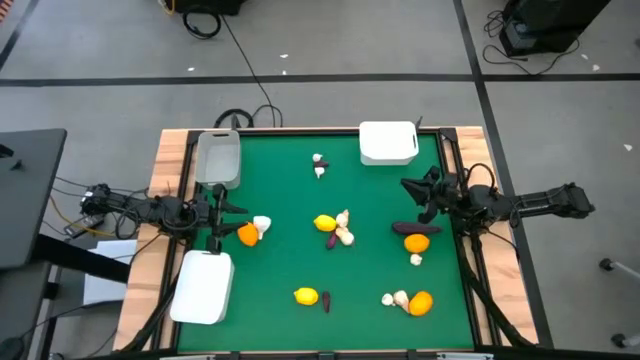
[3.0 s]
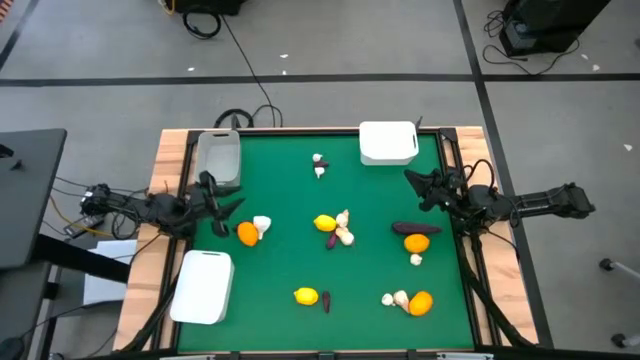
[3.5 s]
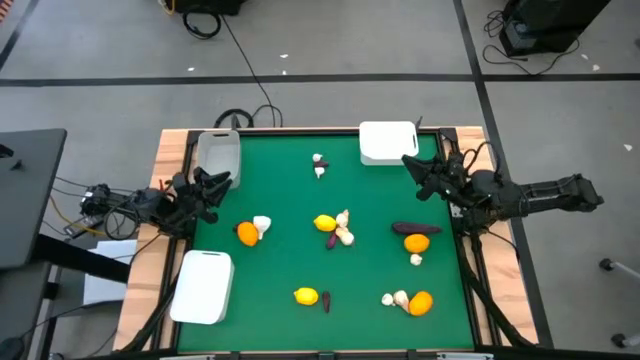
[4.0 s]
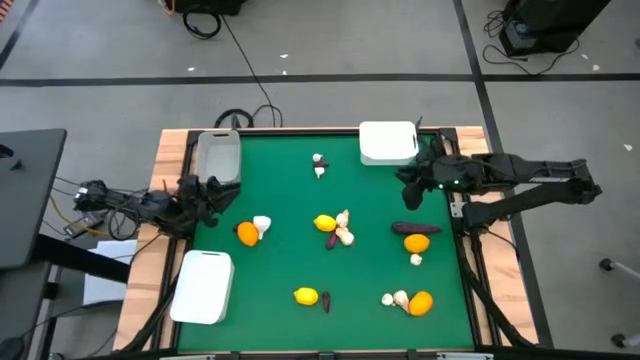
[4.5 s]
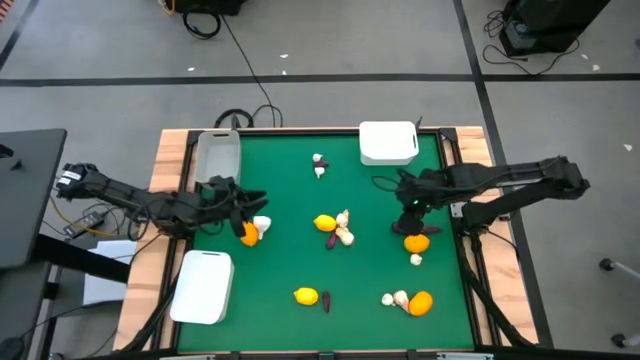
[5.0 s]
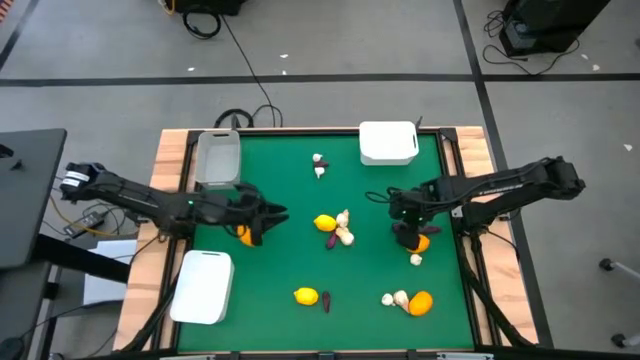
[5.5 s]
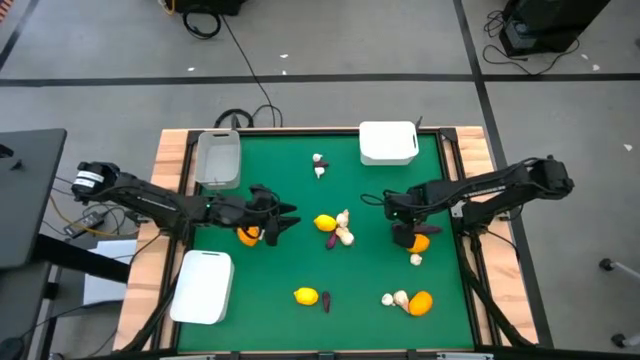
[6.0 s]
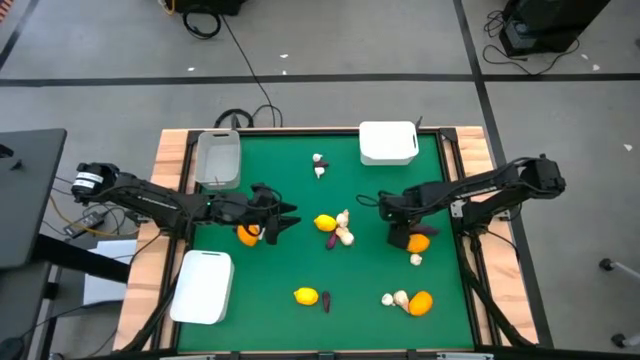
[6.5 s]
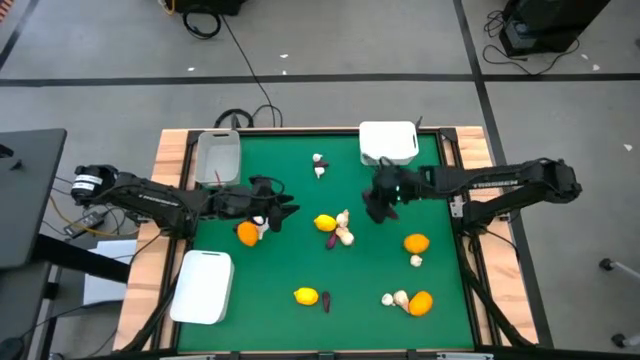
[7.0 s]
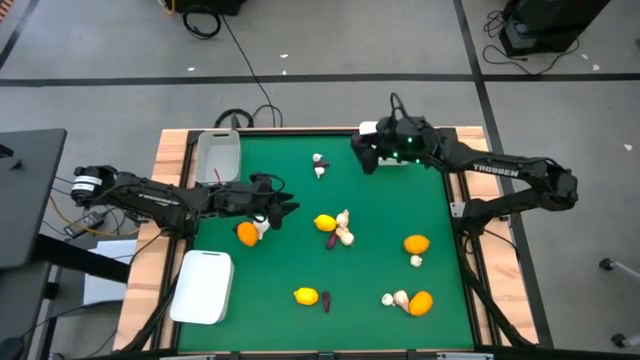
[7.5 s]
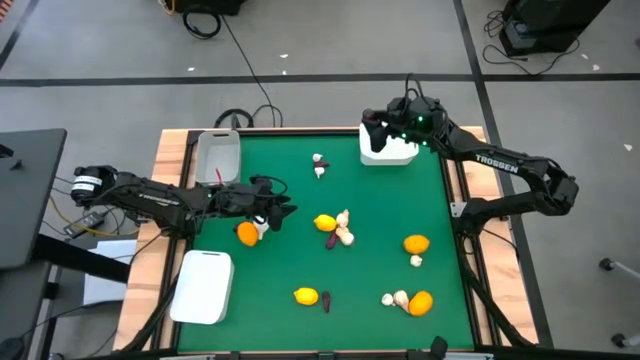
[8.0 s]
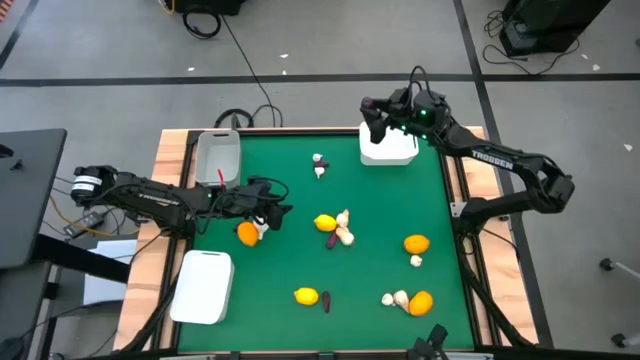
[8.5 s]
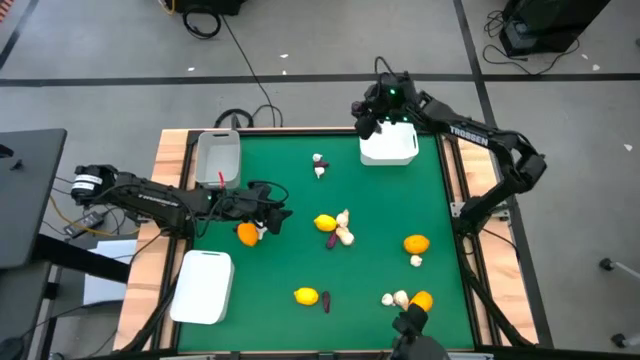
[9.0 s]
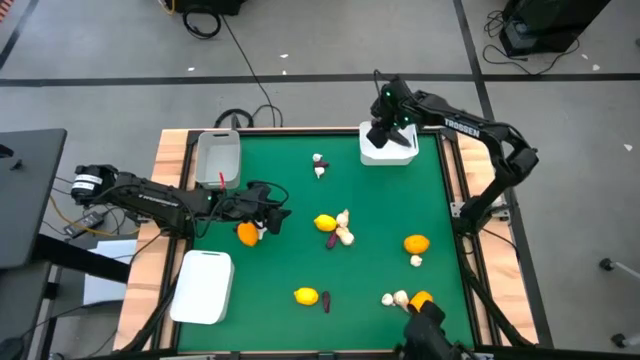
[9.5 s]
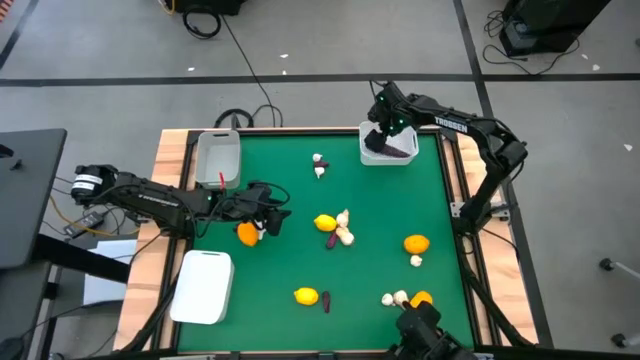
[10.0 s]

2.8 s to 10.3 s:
Task: Sort produce into baskets
Put the eggplant into the top white bin

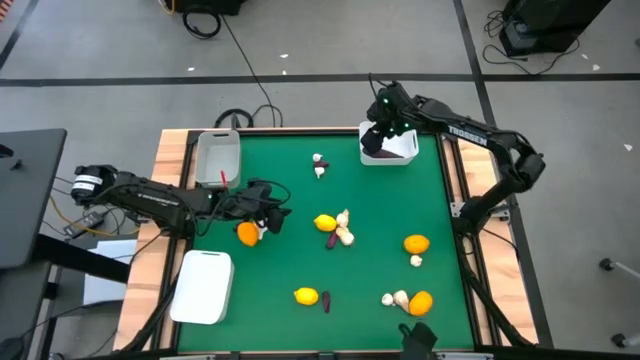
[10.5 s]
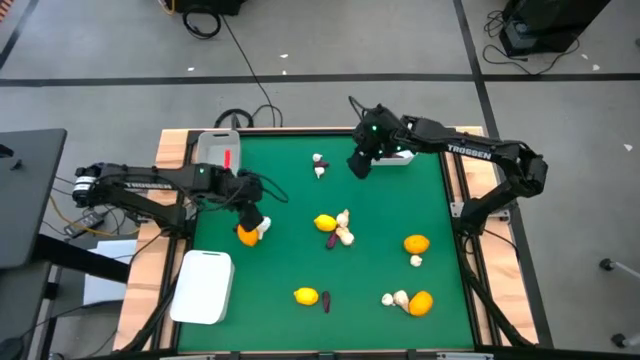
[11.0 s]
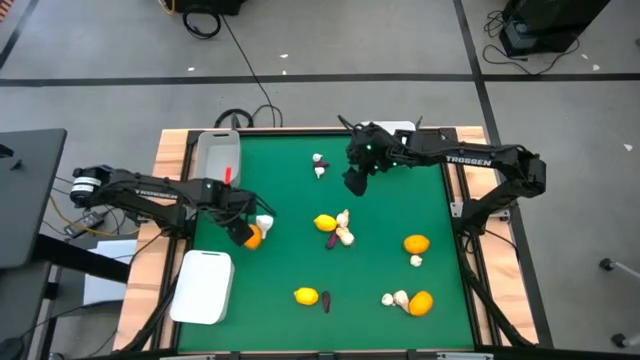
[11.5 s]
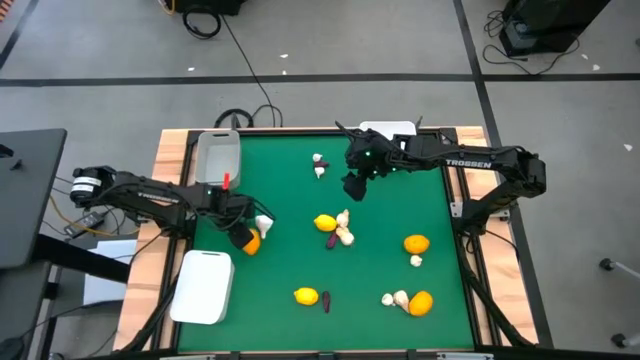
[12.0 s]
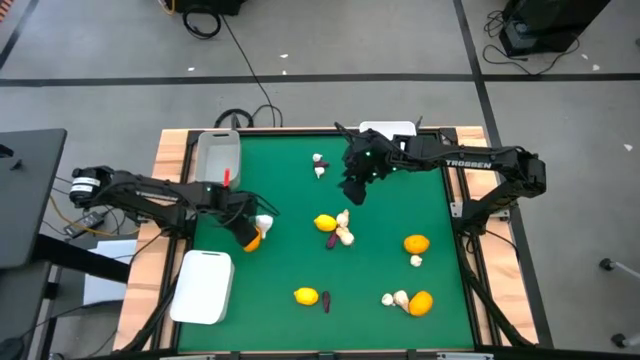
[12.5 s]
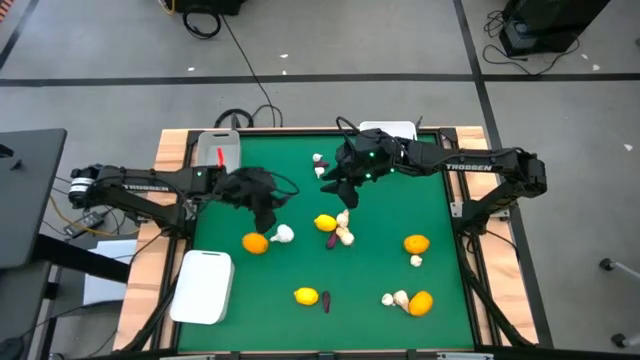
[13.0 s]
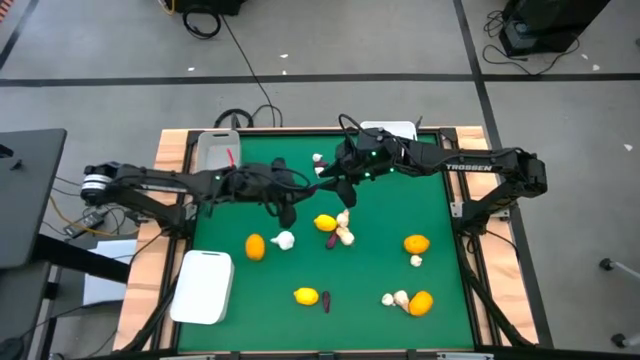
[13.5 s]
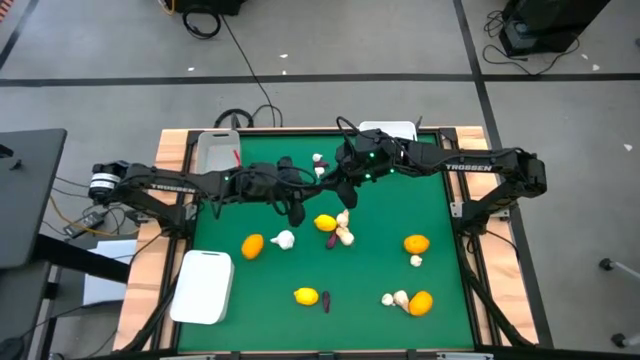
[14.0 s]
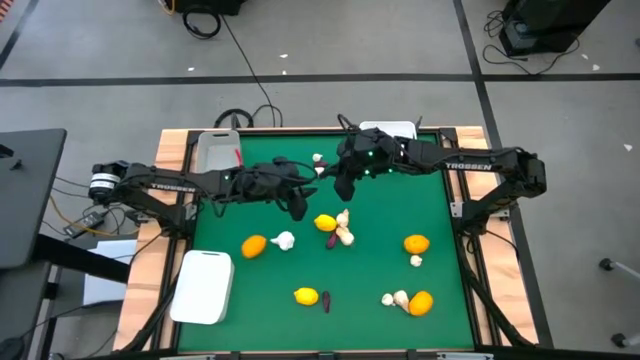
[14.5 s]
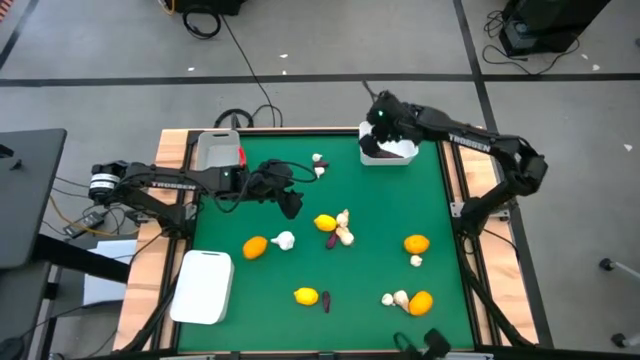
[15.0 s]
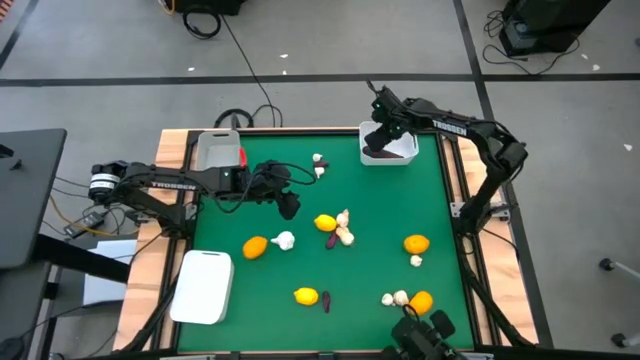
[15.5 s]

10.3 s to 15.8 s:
Put the eggplant into the top white bin

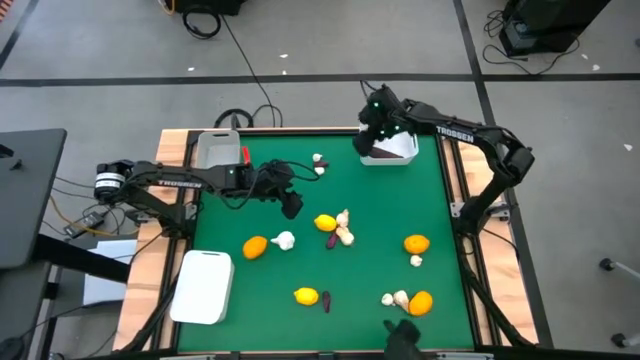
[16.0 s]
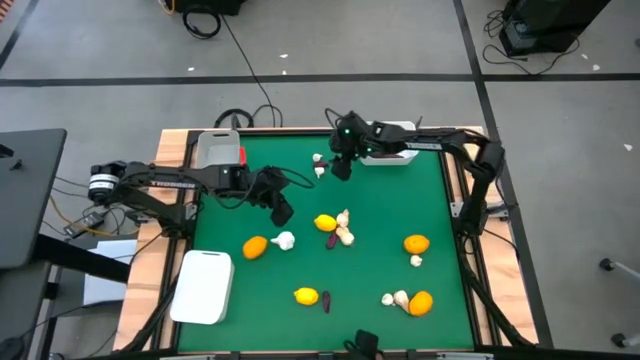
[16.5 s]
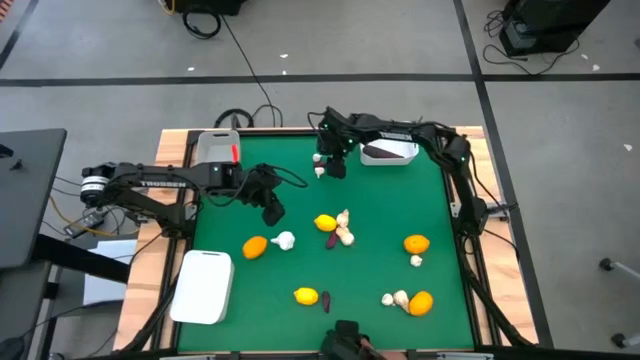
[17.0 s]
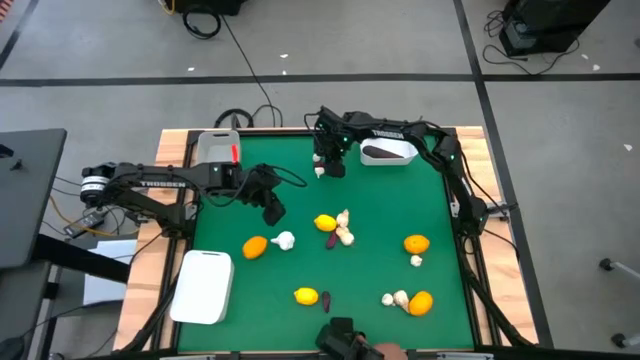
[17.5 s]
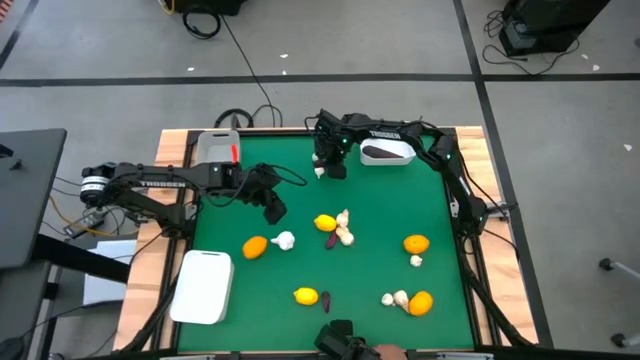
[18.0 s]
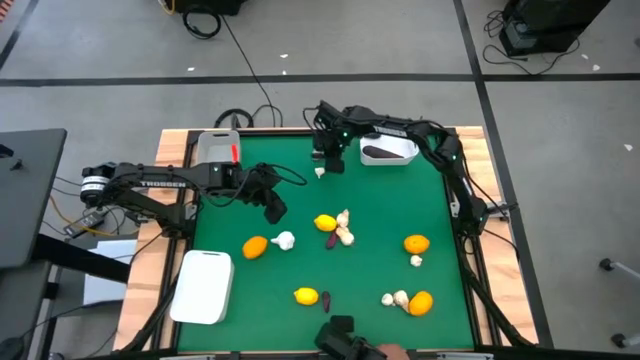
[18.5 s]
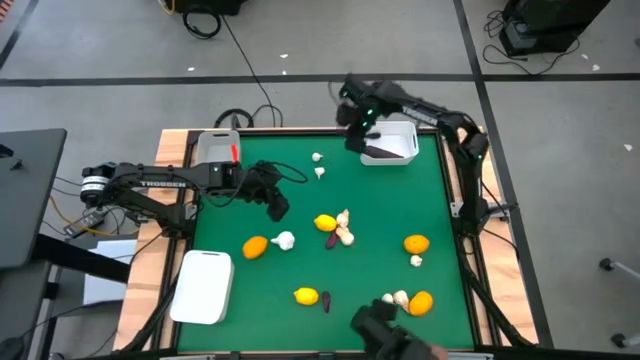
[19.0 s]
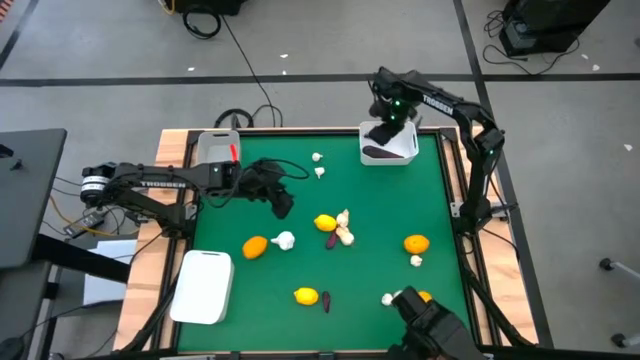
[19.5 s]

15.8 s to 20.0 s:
Put the eggplant into the top white bin

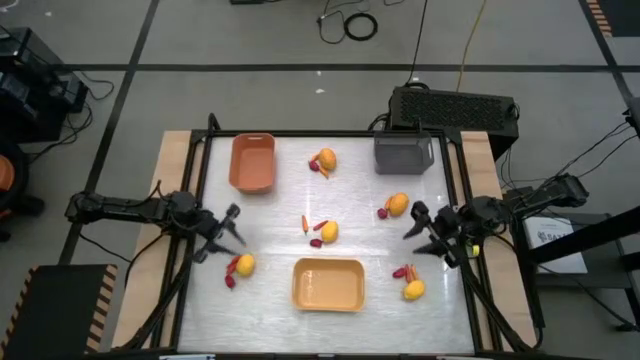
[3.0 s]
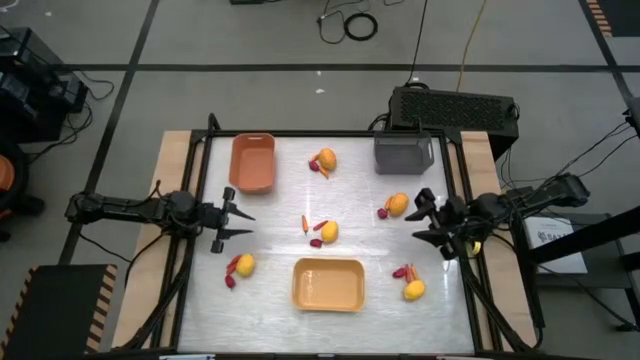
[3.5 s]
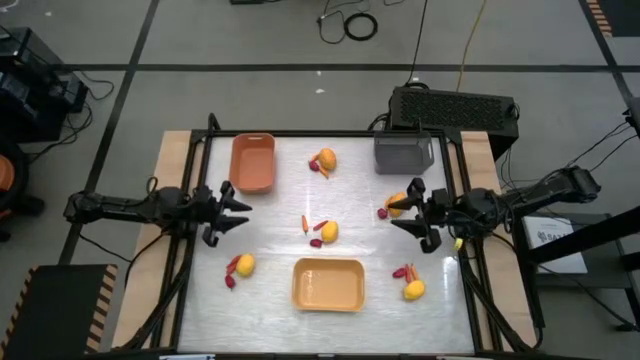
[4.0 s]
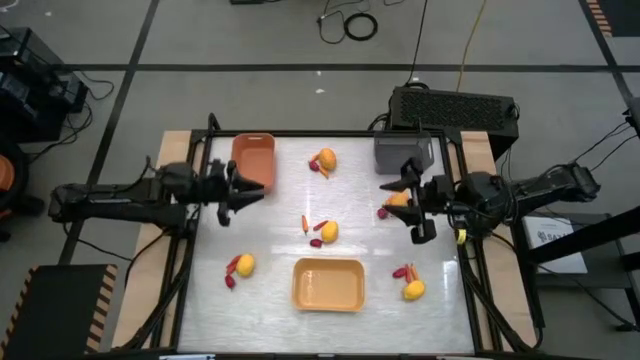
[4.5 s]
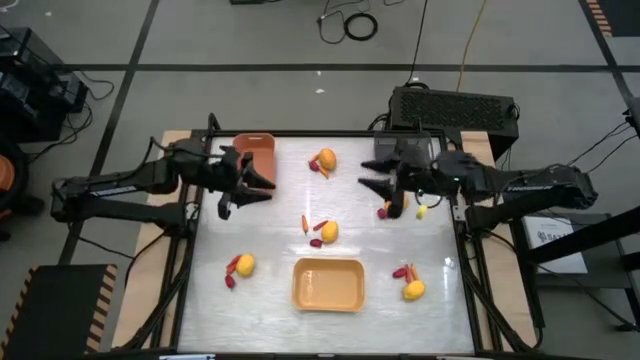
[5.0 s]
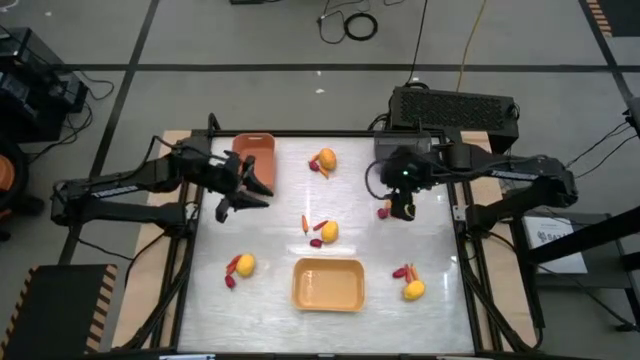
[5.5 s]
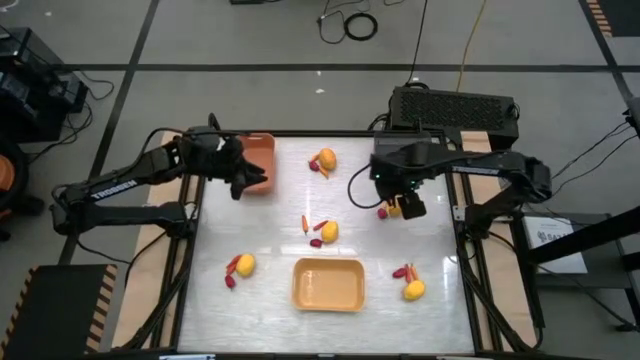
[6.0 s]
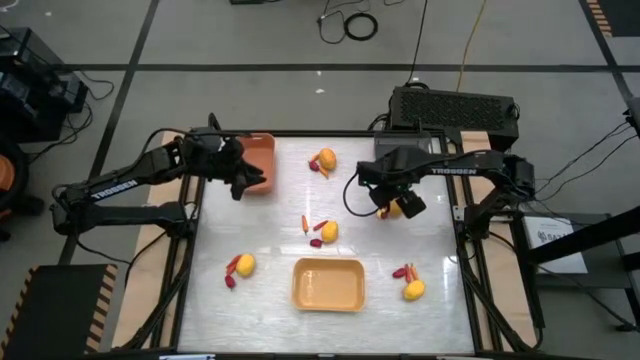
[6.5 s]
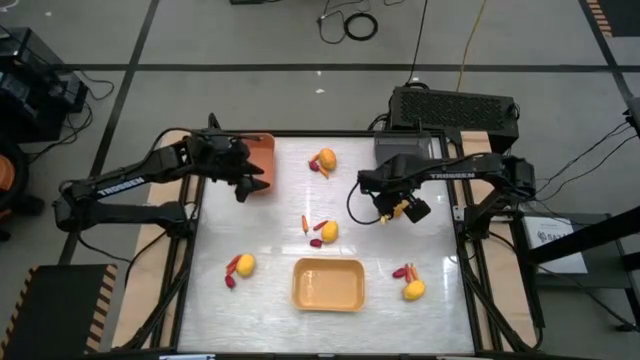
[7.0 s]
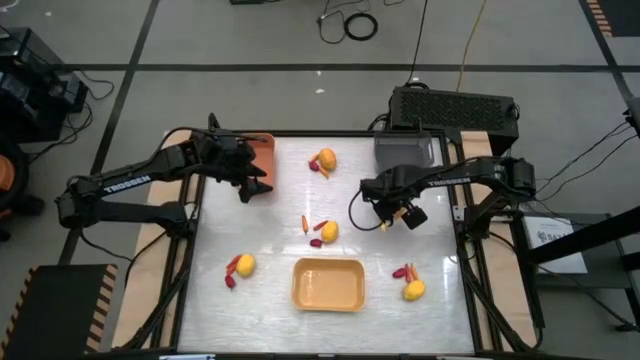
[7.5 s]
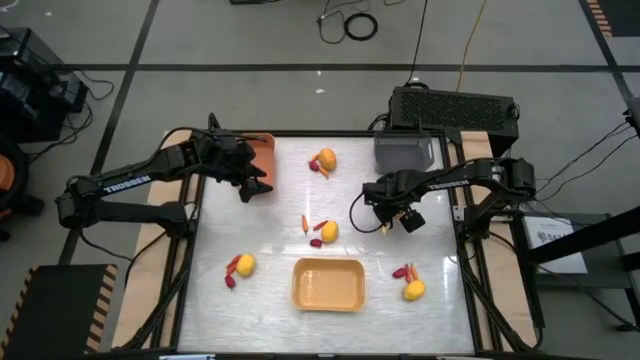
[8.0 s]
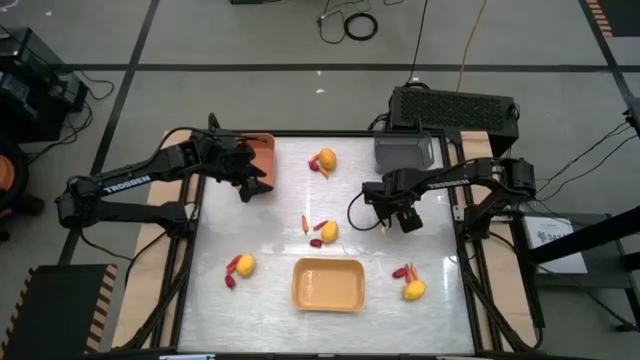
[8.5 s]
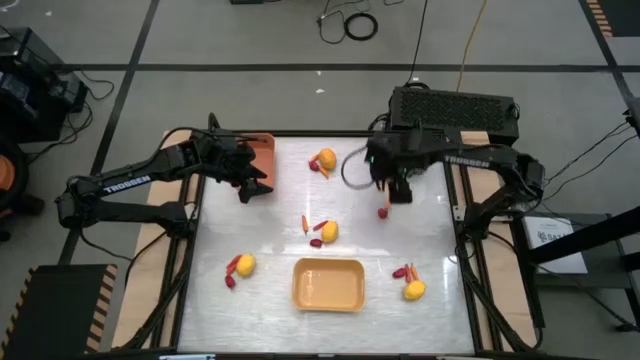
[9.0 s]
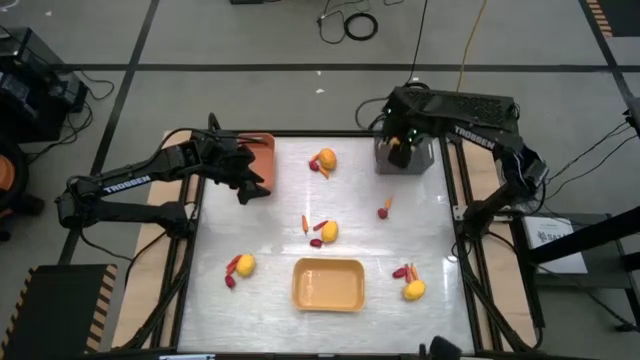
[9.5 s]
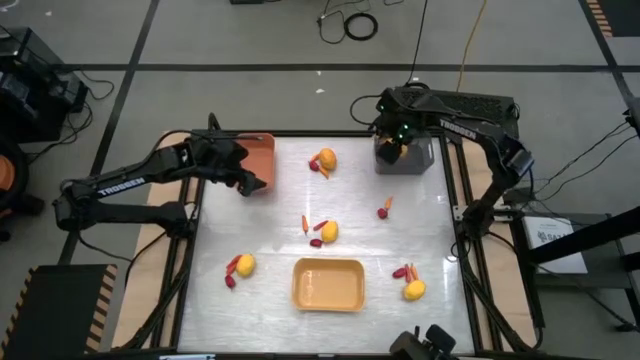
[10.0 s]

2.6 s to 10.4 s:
Task: Sort produce into baskets
Put the lemon into the gray bin
